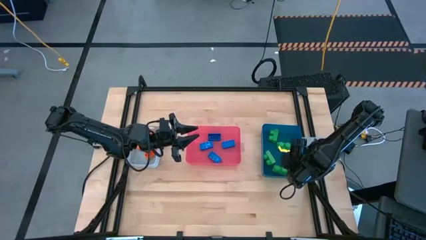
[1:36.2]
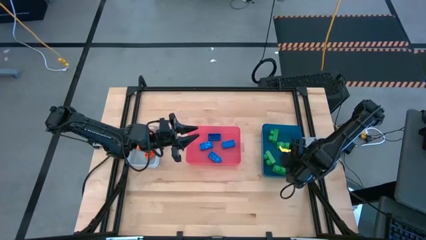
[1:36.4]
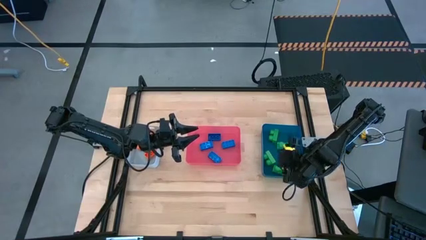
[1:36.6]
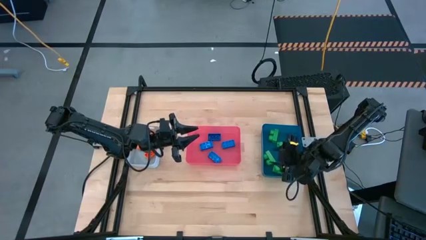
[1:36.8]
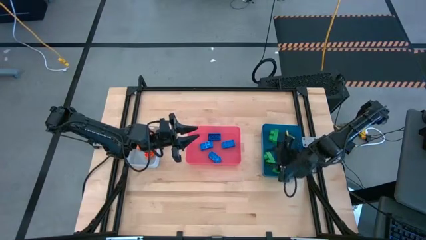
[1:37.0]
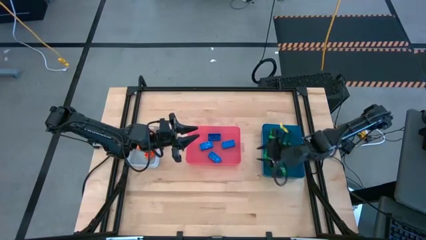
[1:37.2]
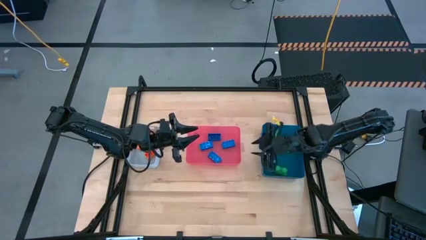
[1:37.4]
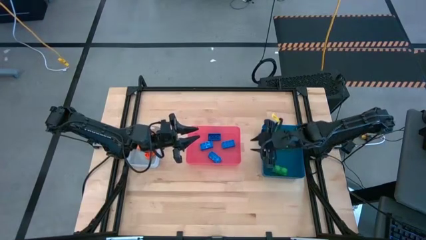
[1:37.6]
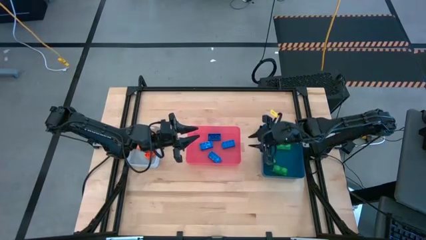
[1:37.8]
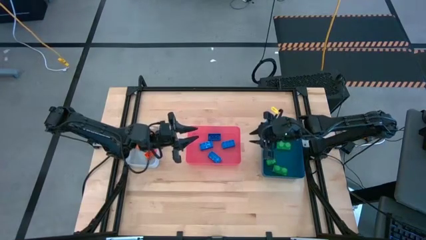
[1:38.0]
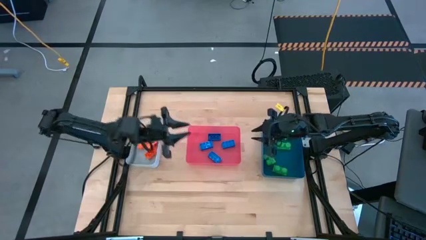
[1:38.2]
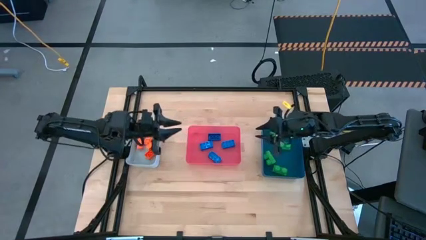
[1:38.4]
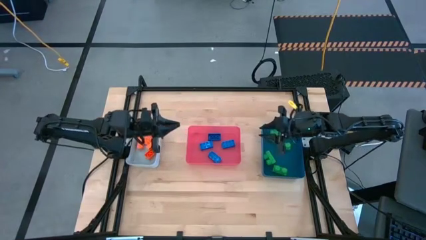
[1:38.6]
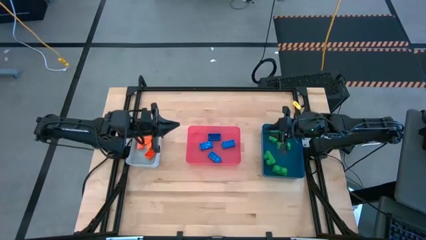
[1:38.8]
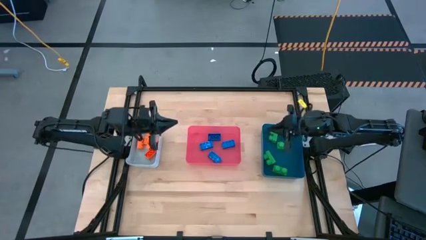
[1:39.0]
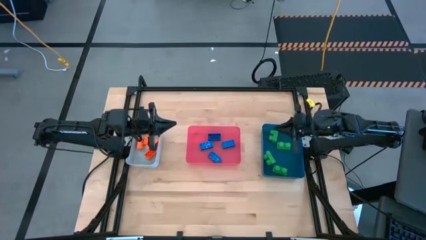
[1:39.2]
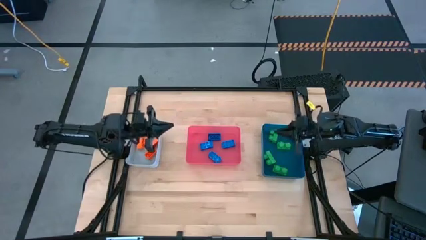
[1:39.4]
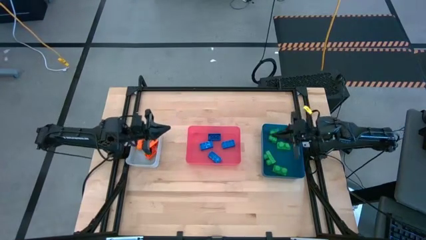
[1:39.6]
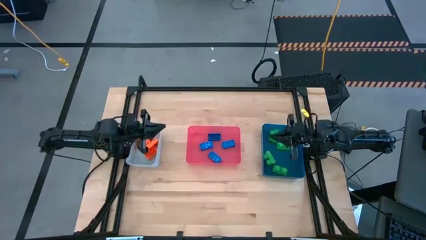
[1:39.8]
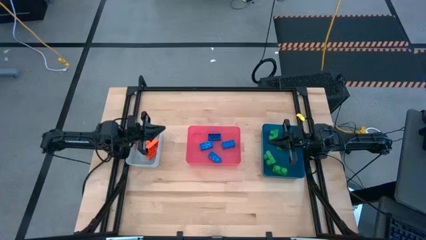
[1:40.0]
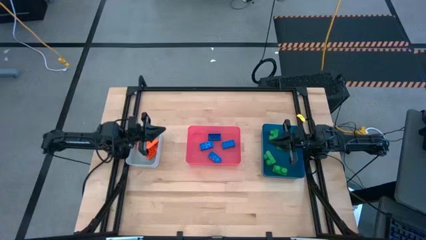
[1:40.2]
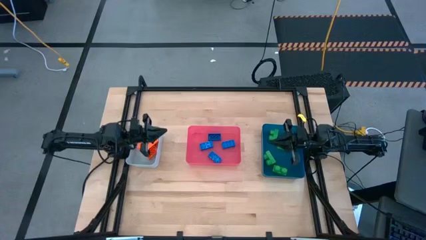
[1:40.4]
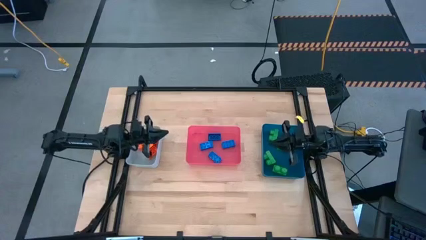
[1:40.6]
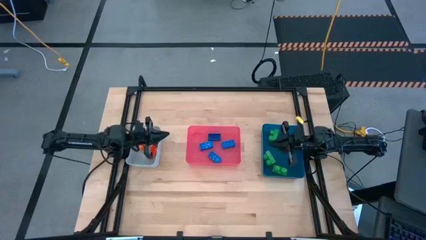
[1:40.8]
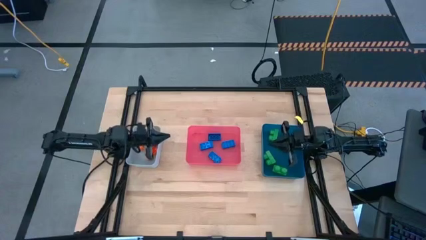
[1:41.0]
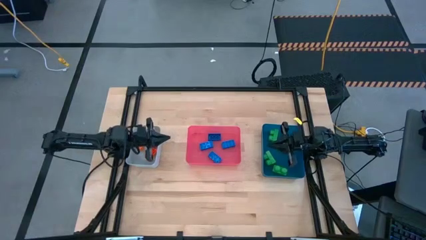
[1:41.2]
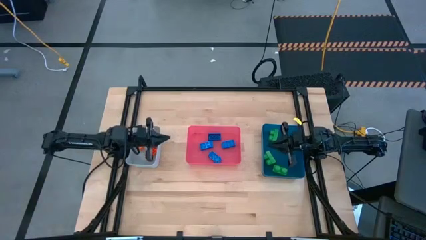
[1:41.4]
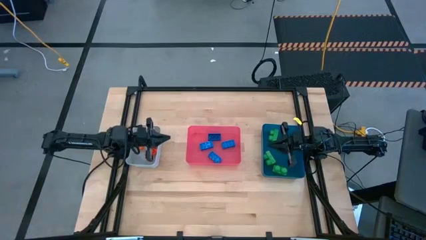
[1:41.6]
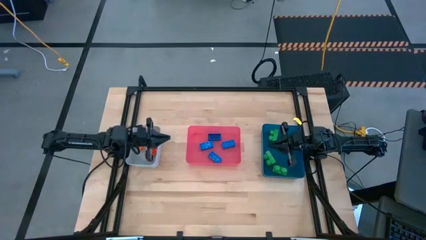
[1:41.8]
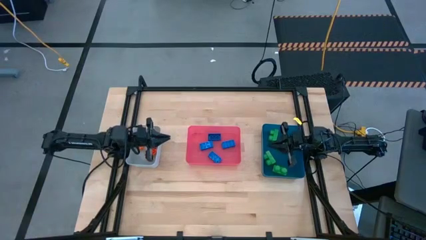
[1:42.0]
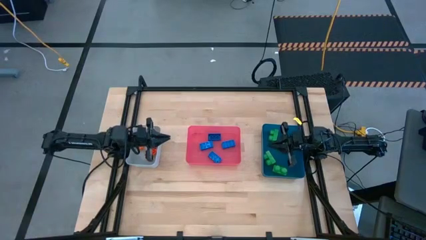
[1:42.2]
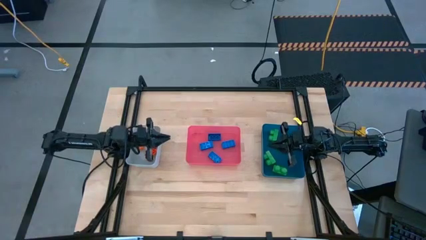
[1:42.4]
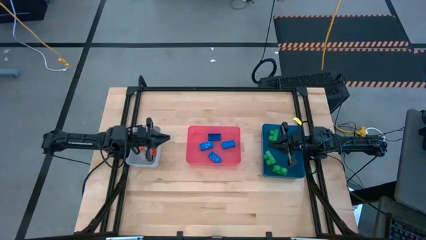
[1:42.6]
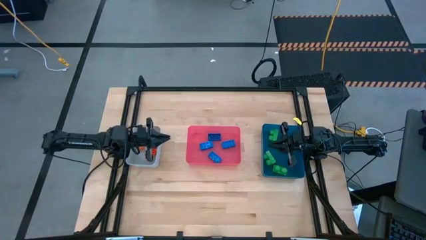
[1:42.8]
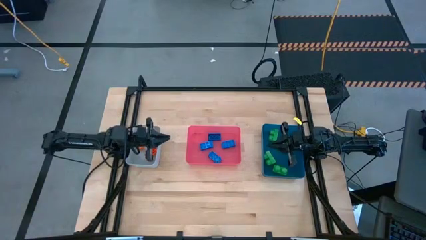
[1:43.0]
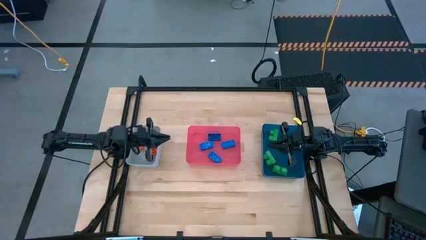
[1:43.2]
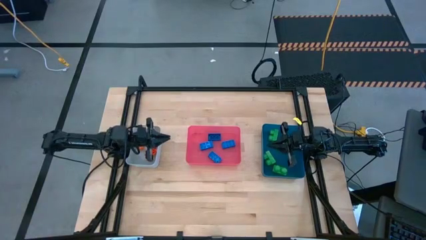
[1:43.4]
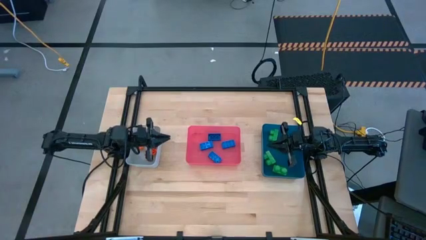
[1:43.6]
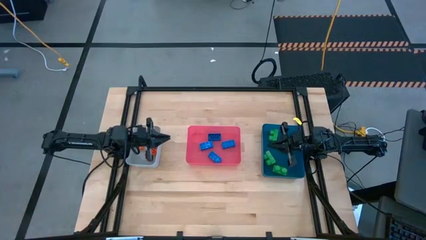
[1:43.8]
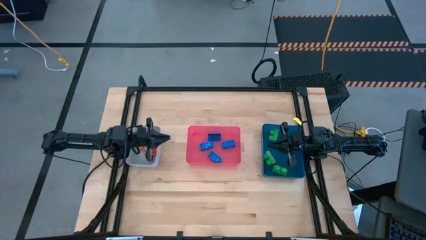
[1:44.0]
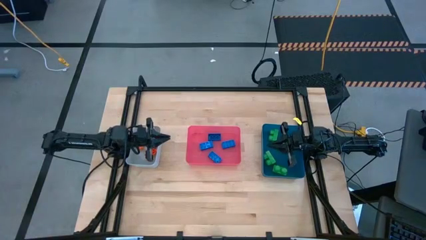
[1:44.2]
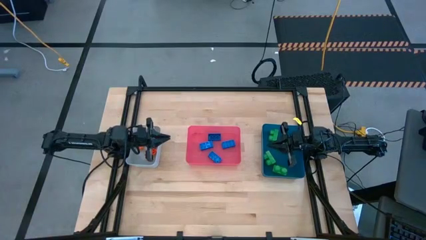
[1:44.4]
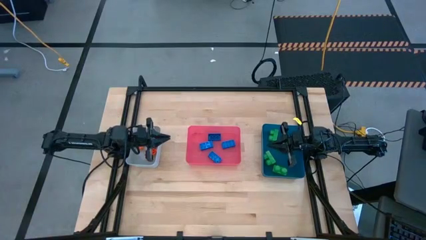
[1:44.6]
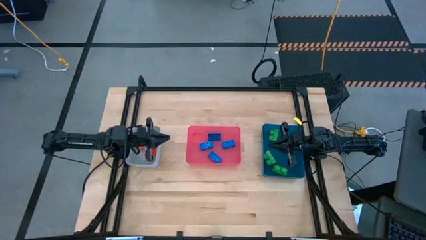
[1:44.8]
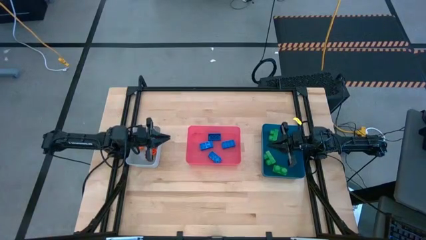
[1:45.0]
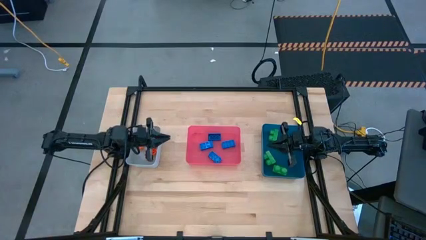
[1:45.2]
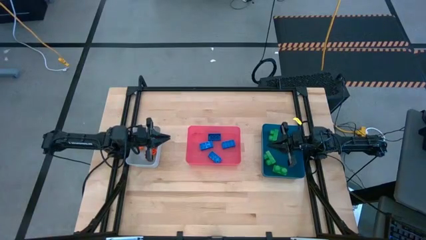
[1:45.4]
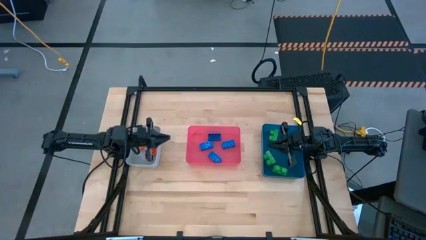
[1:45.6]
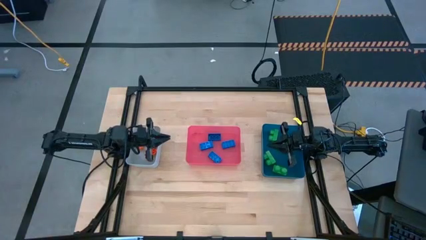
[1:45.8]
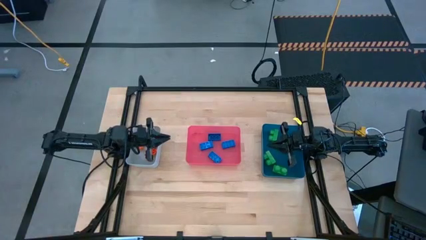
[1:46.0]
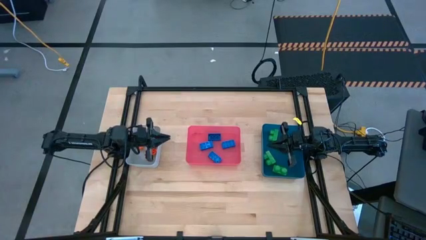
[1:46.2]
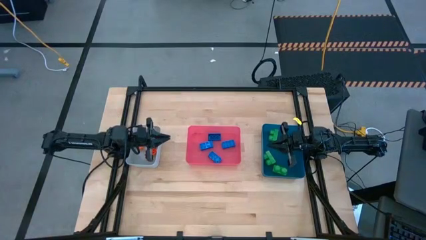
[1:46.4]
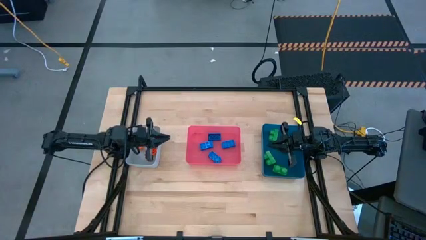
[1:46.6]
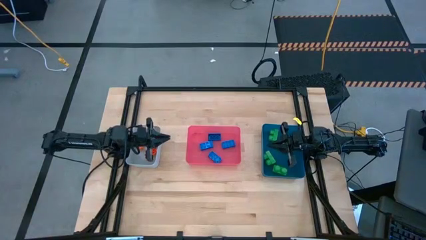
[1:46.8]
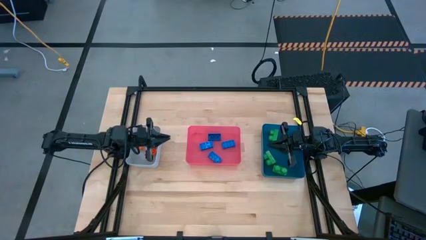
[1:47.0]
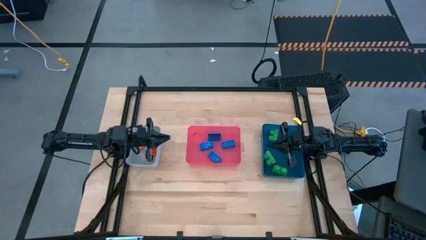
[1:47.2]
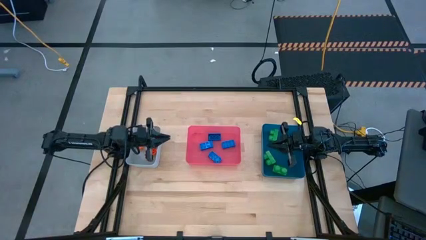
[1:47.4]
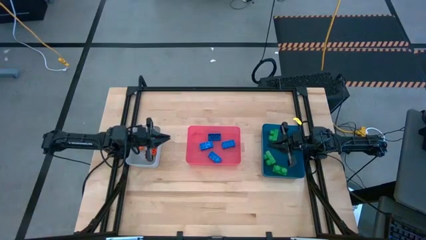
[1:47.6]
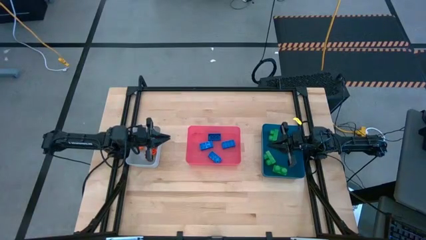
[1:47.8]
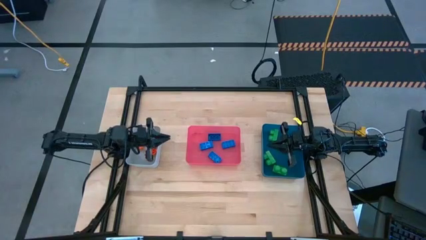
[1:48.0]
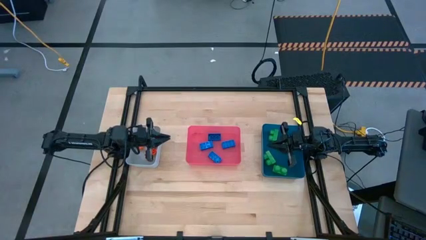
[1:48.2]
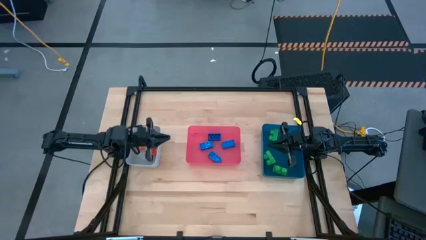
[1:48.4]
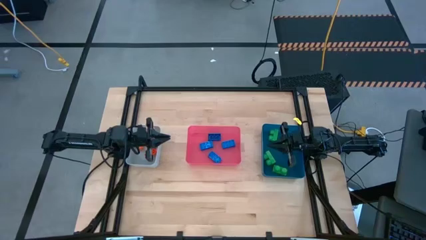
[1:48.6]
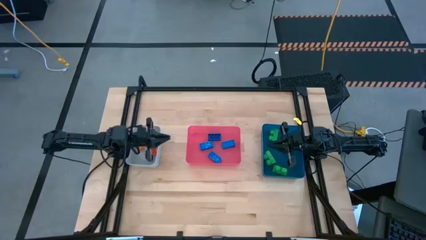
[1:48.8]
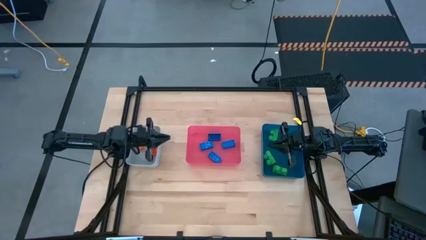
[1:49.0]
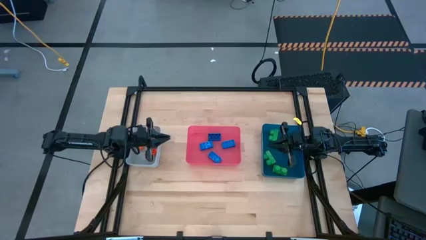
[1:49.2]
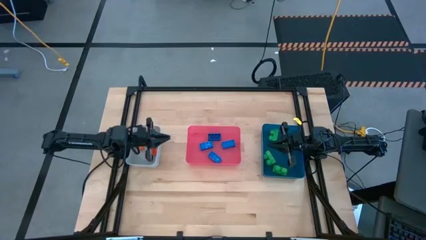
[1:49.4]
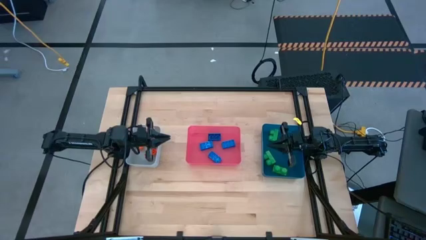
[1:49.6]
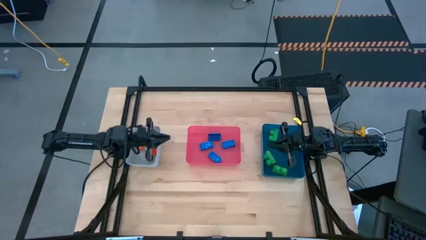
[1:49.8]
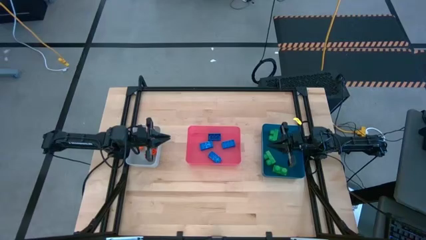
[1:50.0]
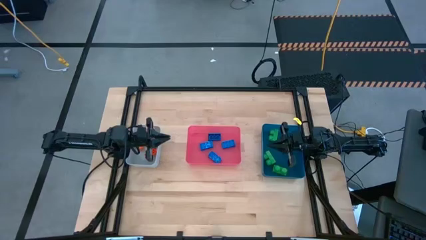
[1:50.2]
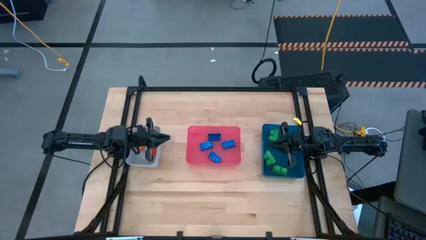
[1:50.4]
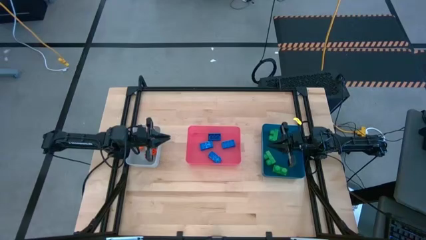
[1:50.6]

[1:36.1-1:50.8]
Task: Sort & place blocks by color
Return to Home Position
